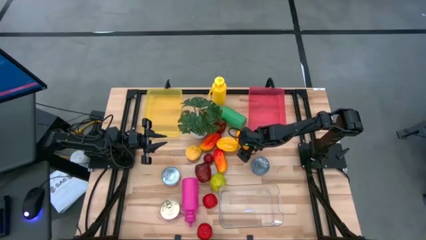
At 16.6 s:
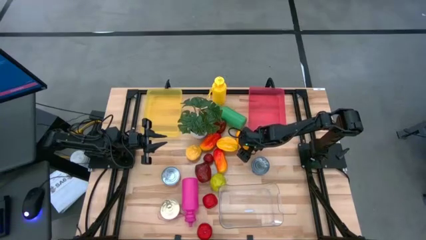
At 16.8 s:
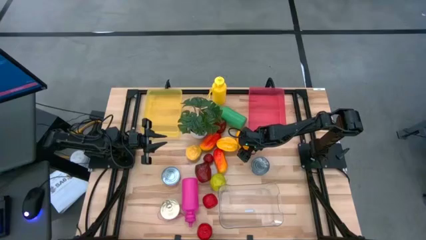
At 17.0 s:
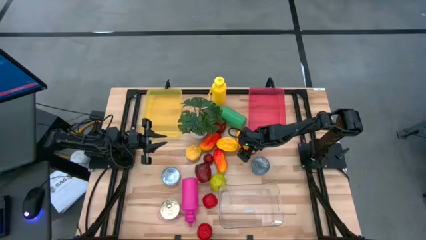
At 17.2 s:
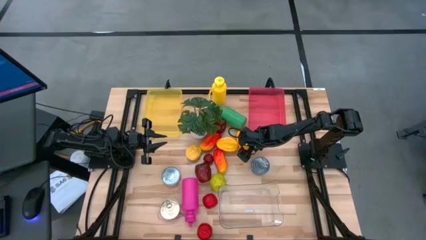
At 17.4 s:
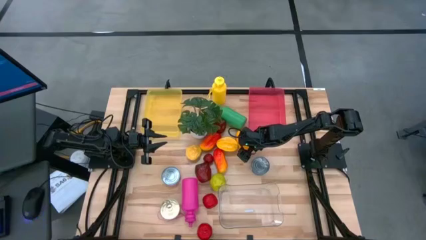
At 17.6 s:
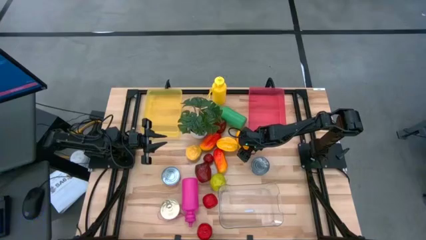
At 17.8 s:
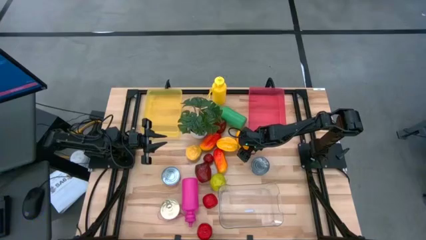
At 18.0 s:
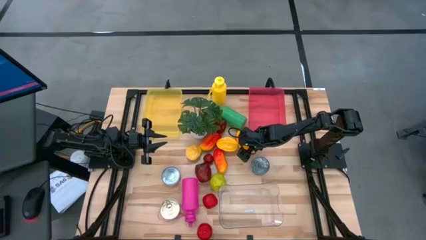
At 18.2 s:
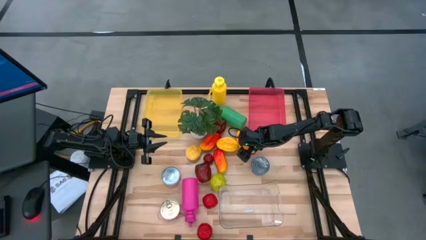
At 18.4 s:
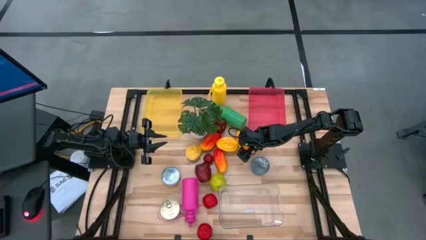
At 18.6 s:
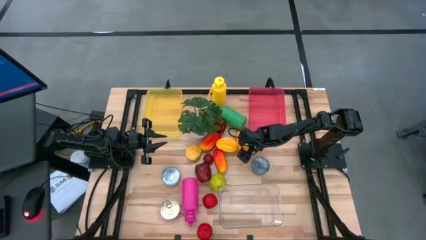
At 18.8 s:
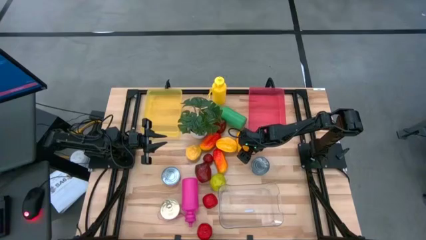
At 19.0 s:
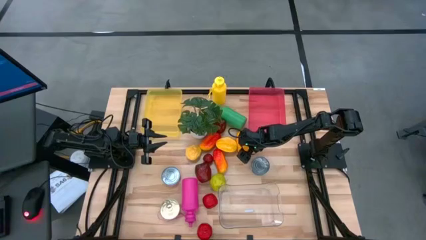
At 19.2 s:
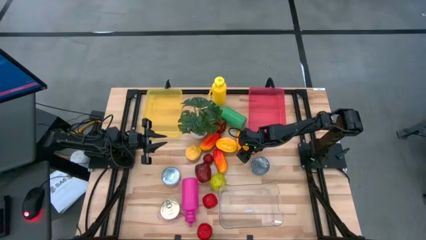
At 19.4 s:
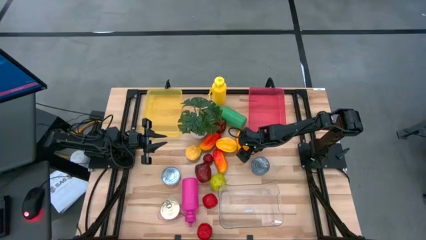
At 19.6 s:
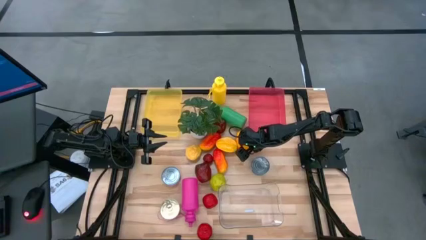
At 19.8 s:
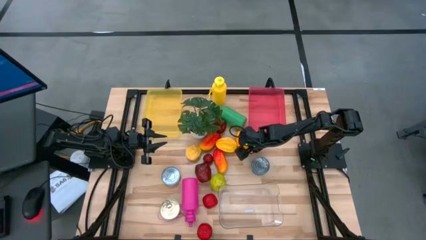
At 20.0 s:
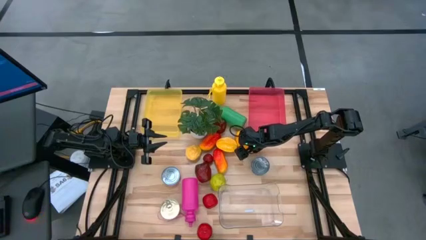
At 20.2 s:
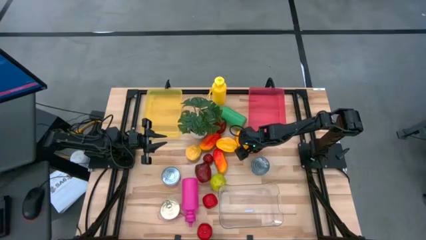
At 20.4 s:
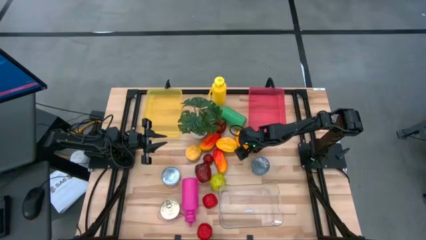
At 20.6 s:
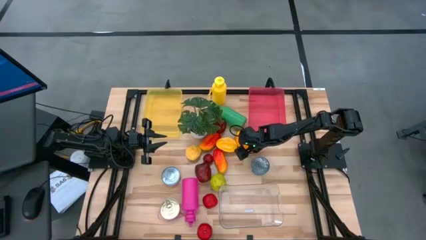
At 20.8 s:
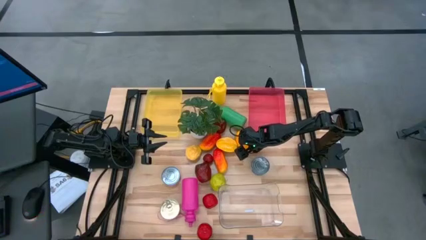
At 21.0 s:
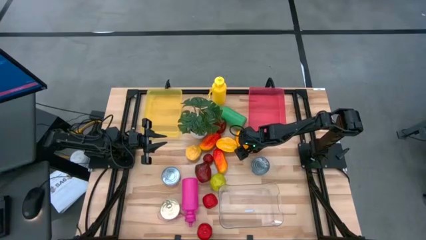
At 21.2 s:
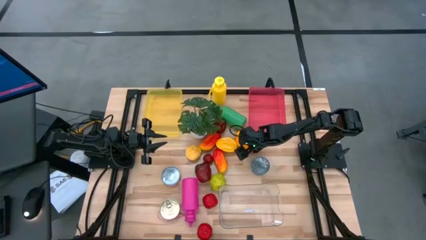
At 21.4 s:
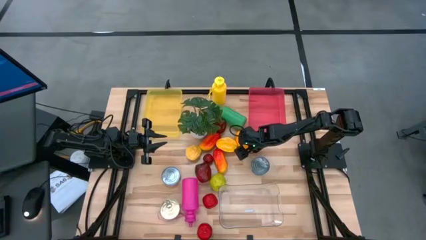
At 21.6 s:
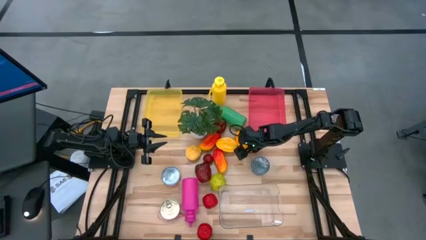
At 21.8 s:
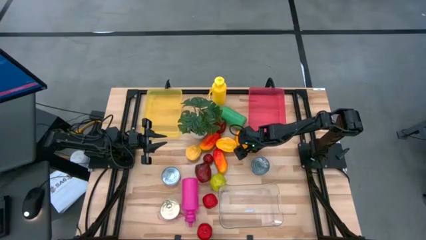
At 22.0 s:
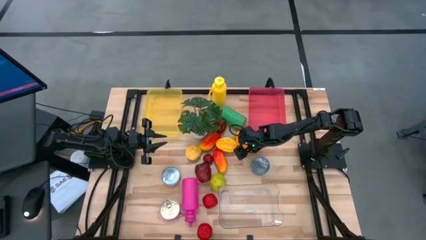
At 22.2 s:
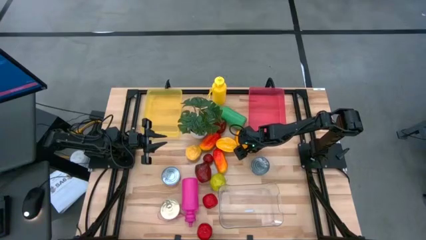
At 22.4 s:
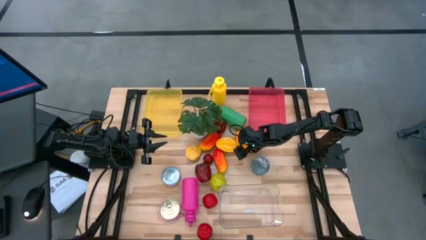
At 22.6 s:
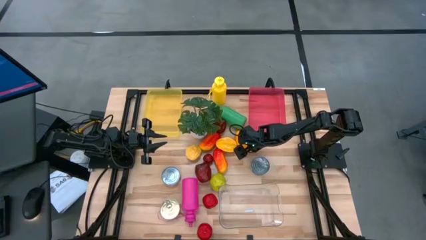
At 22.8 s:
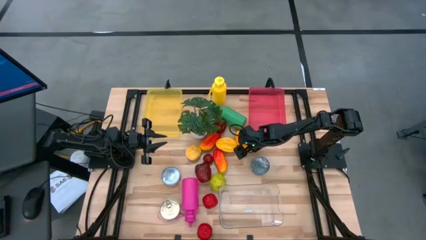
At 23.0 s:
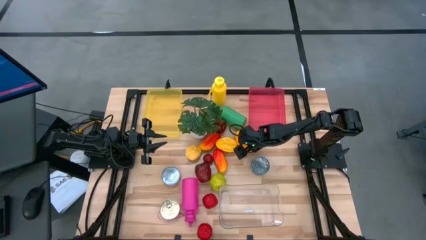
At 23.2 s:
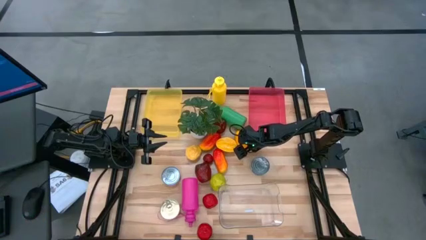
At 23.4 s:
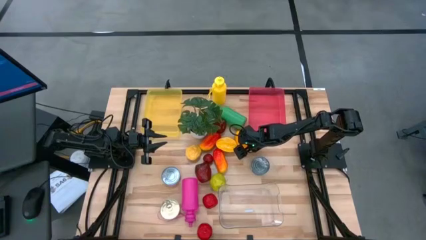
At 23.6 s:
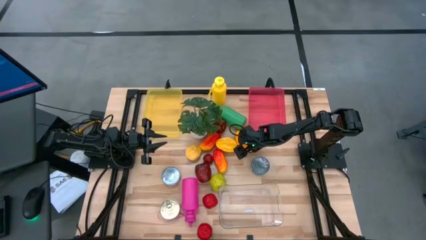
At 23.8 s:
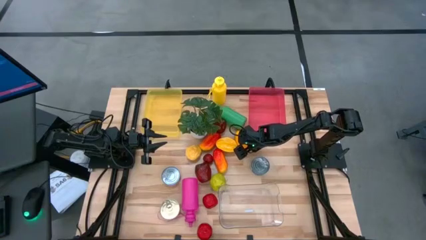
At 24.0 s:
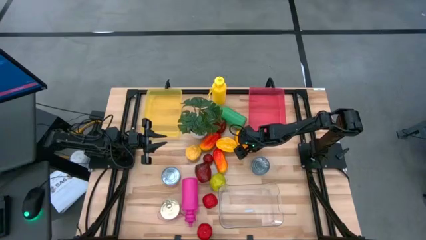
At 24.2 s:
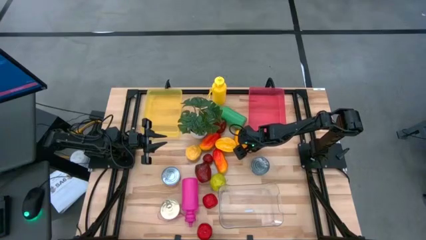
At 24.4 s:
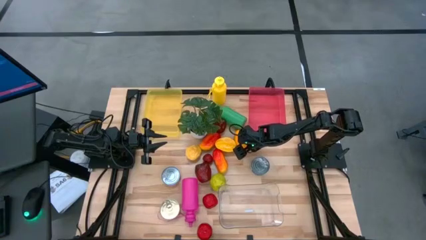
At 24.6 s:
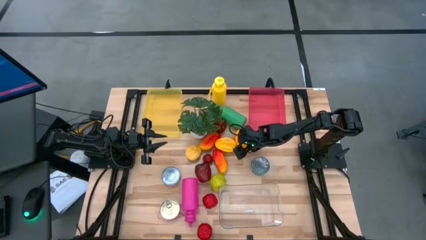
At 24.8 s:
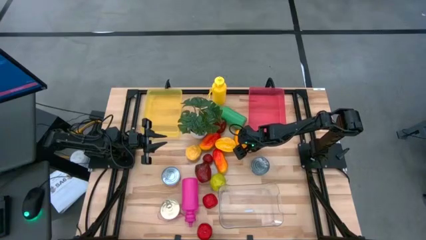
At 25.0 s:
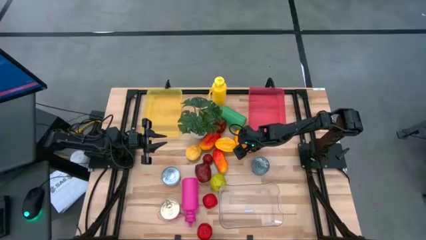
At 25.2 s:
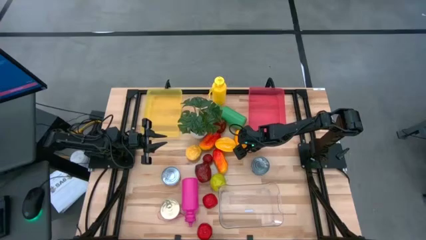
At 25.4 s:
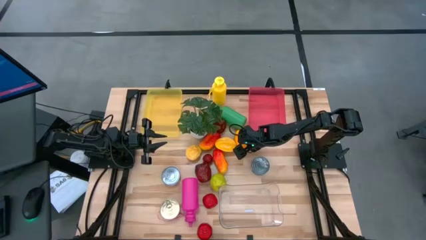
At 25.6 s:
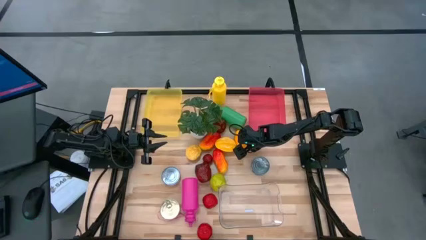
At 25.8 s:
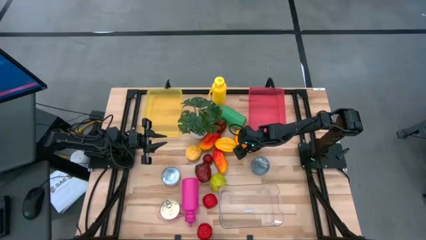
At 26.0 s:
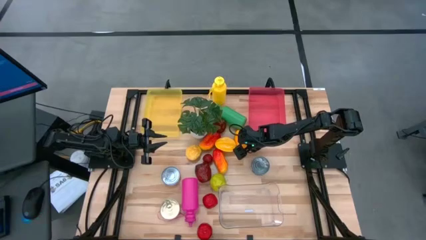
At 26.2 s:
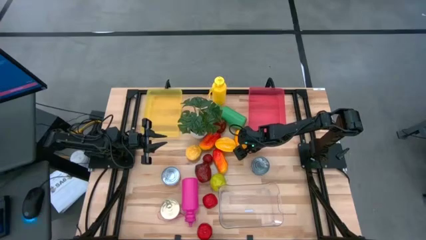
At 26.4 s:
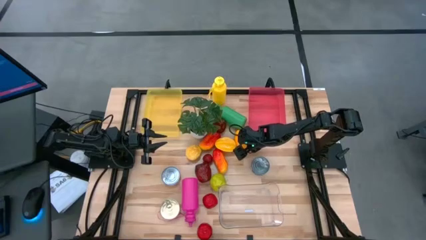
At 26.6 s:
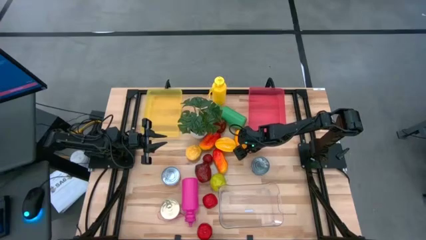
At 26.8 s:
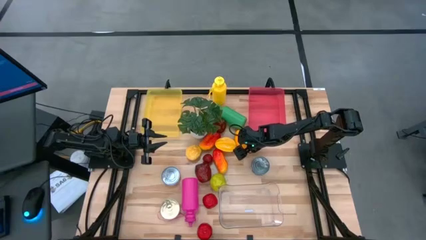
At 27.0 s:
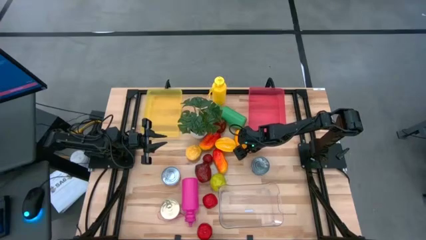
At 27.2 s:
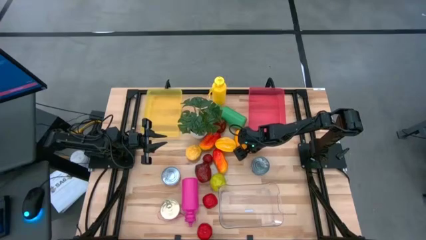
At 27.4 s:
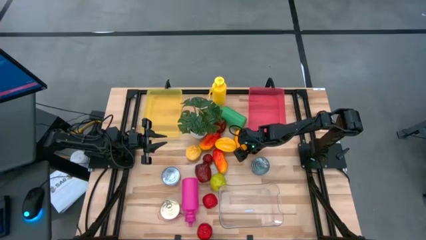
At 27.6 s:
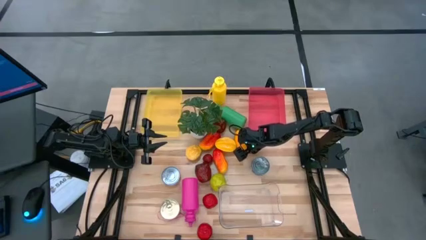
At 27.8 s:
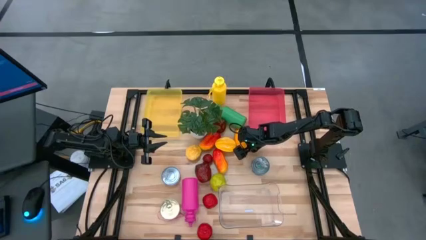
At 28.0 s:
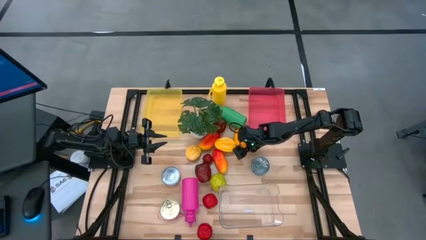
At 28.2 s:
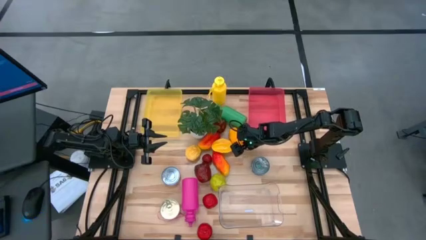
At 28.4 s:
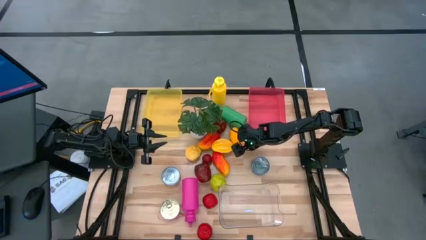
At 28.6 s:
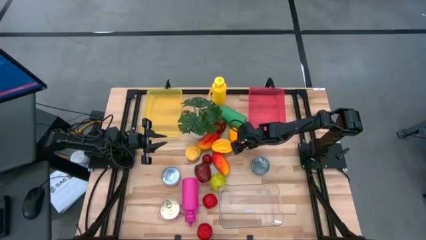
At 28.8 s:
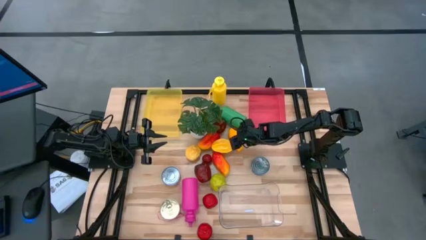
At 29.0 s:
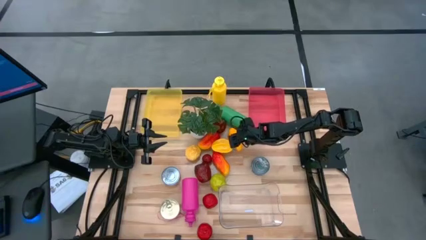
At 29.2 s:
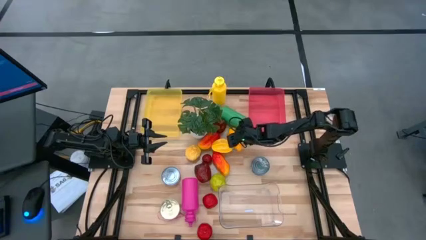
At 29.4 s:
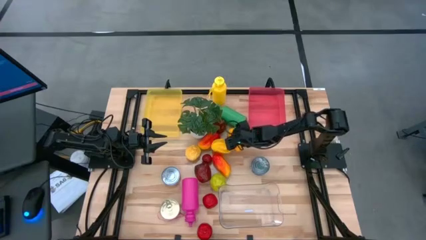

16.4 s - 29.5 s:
Task: Pick & Place Food Item
Put the yellow mango into the yellow bin
